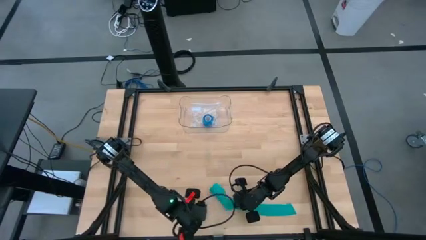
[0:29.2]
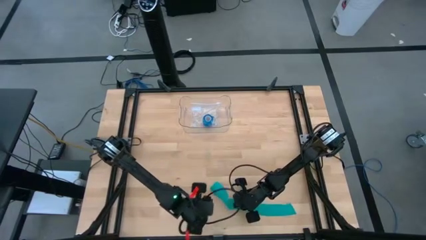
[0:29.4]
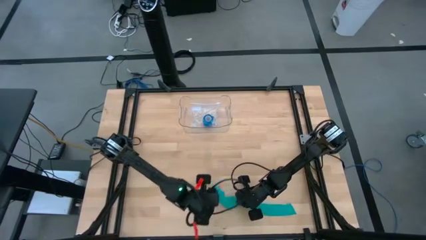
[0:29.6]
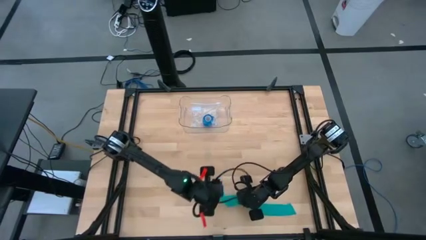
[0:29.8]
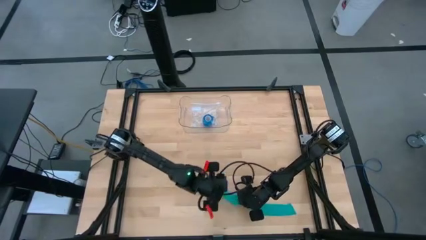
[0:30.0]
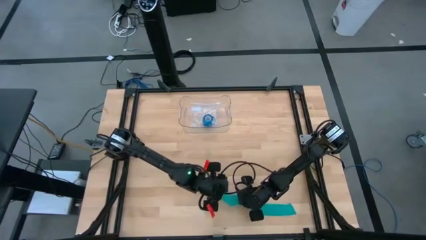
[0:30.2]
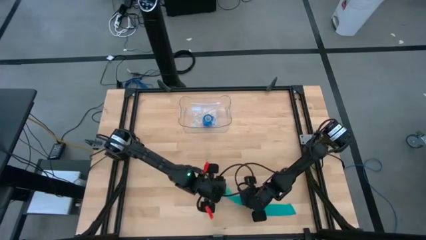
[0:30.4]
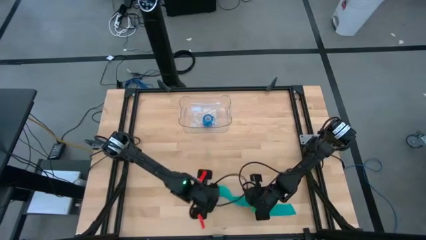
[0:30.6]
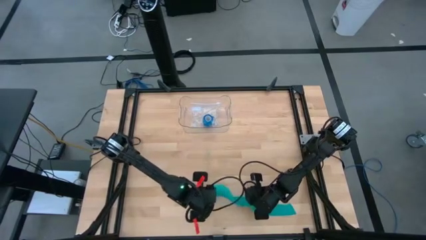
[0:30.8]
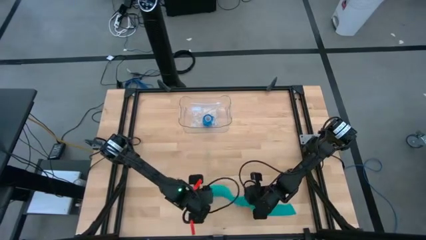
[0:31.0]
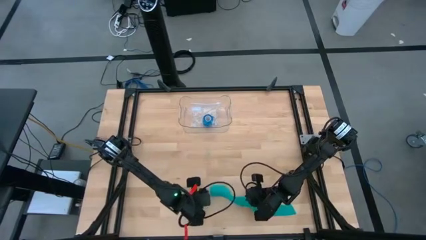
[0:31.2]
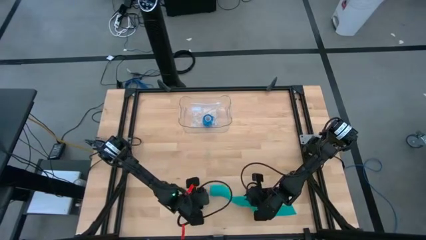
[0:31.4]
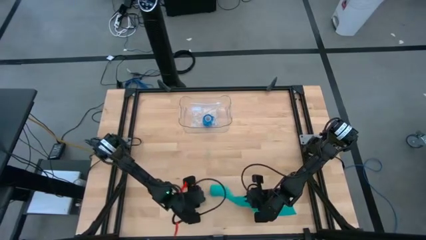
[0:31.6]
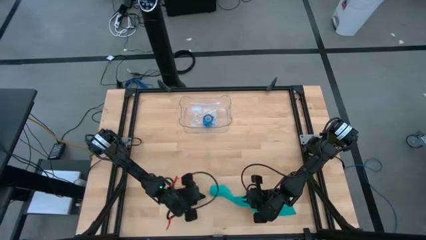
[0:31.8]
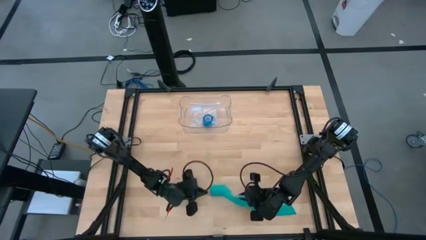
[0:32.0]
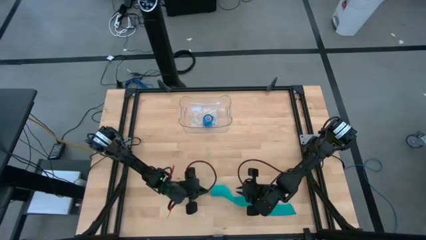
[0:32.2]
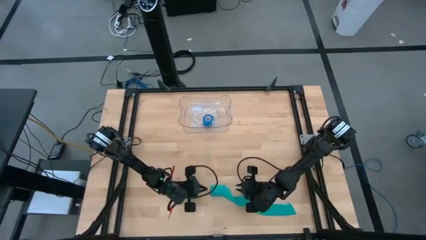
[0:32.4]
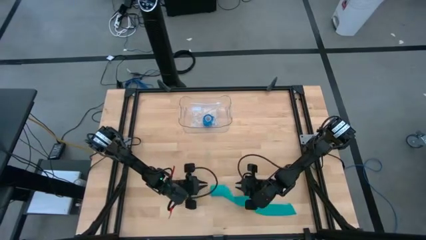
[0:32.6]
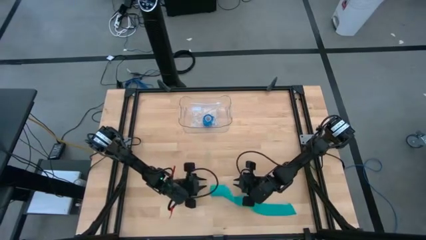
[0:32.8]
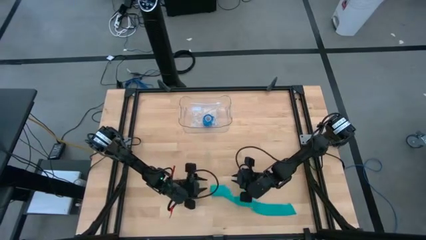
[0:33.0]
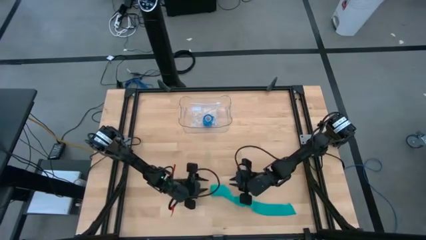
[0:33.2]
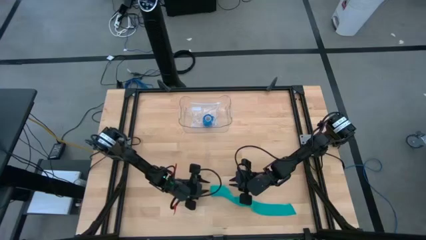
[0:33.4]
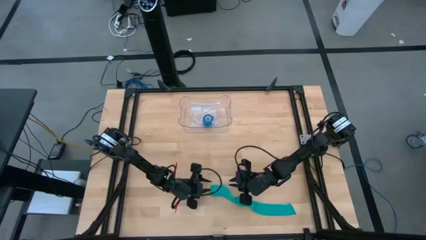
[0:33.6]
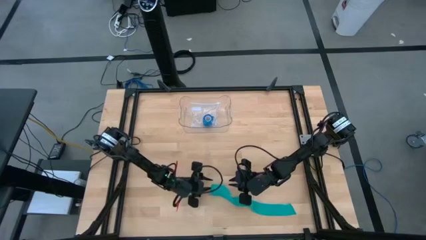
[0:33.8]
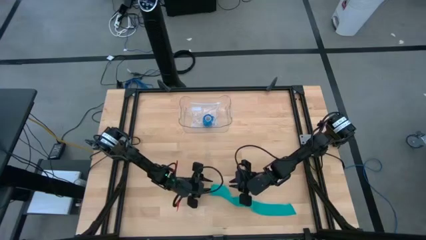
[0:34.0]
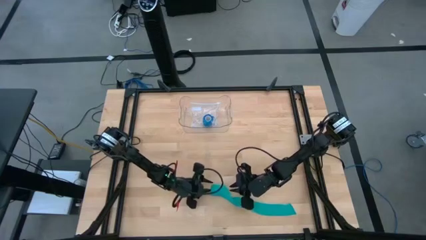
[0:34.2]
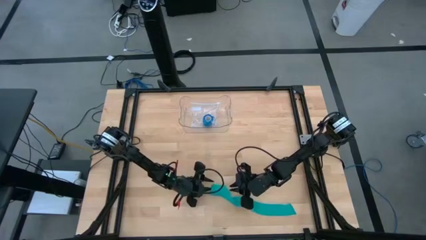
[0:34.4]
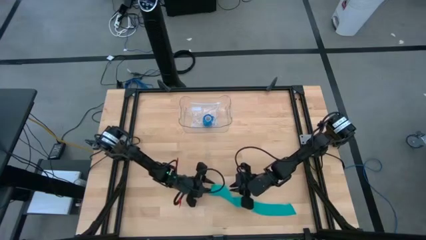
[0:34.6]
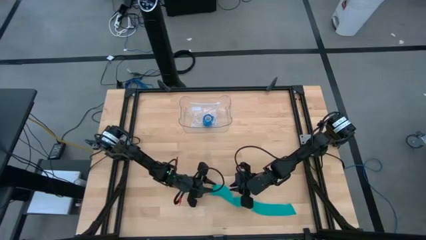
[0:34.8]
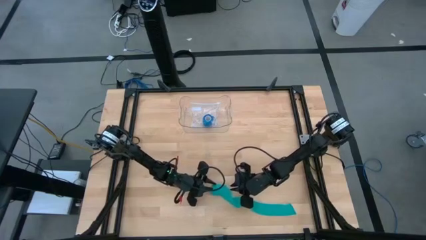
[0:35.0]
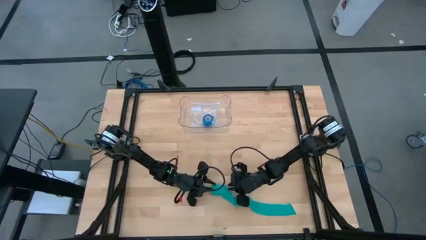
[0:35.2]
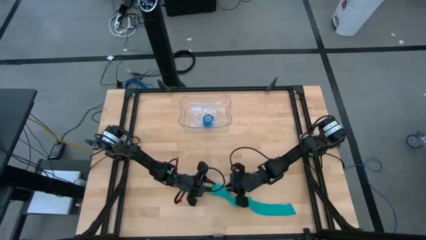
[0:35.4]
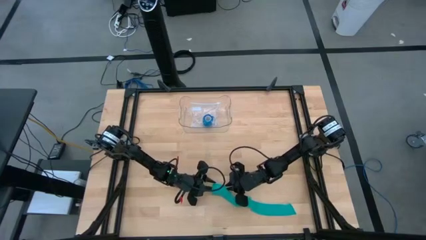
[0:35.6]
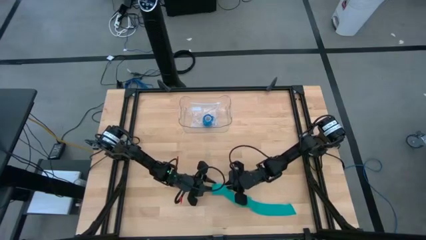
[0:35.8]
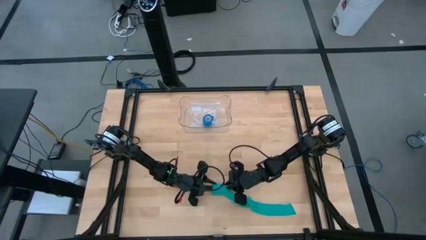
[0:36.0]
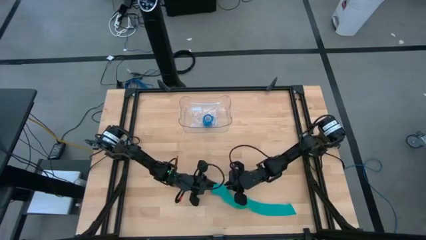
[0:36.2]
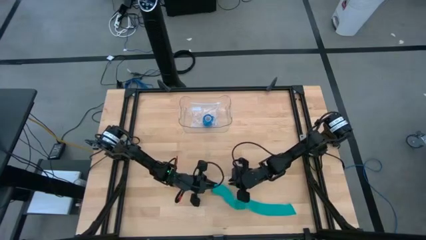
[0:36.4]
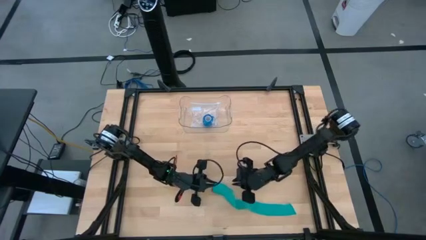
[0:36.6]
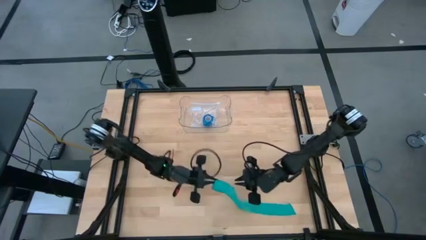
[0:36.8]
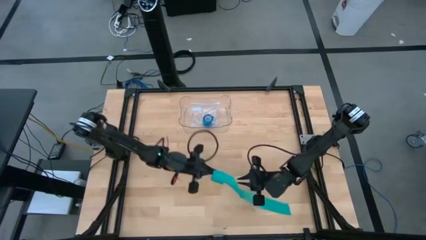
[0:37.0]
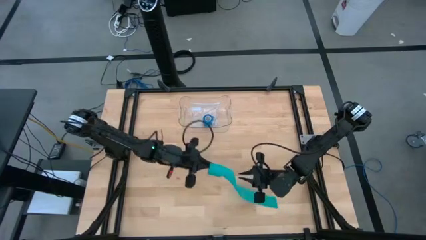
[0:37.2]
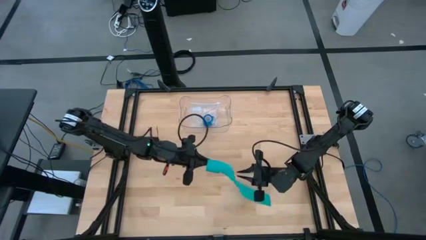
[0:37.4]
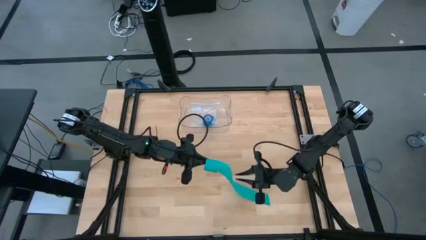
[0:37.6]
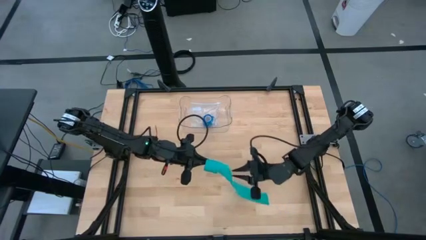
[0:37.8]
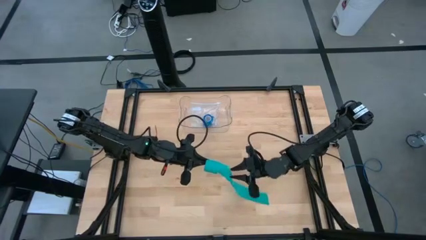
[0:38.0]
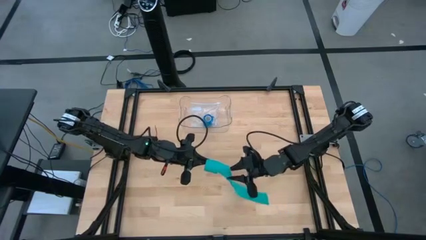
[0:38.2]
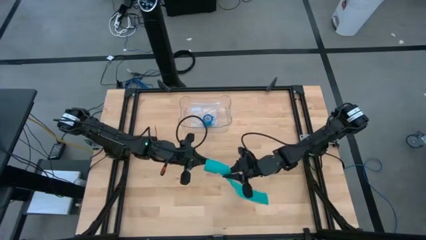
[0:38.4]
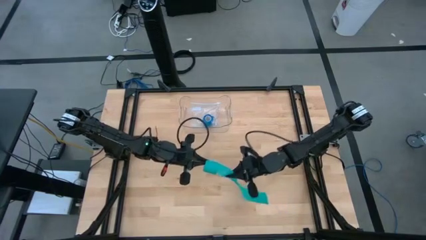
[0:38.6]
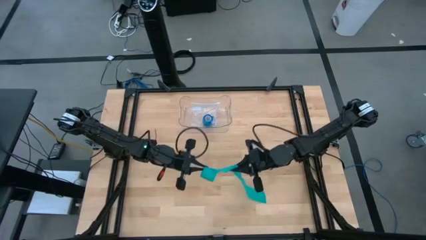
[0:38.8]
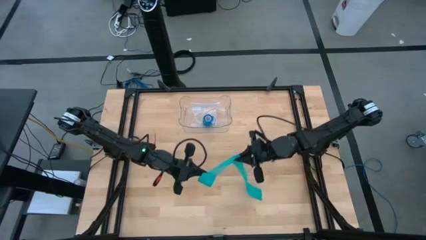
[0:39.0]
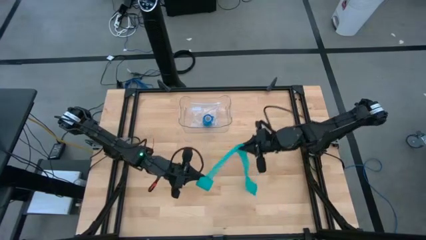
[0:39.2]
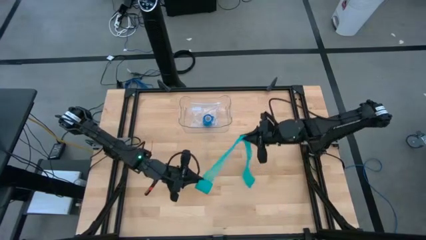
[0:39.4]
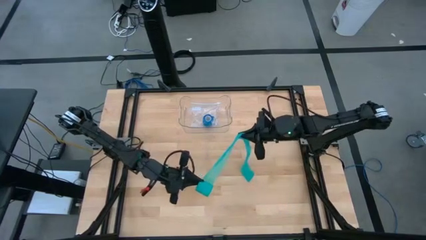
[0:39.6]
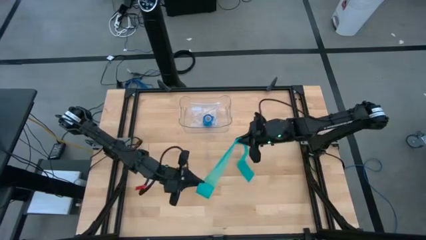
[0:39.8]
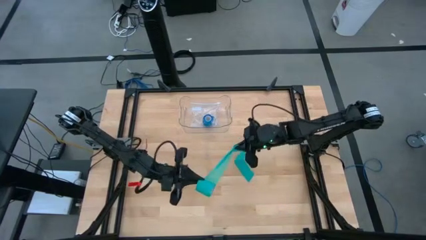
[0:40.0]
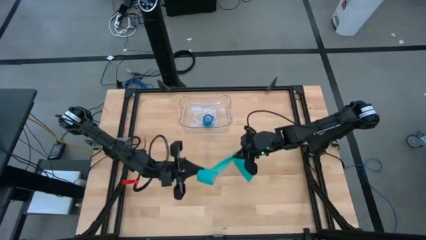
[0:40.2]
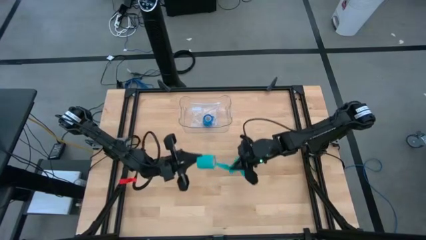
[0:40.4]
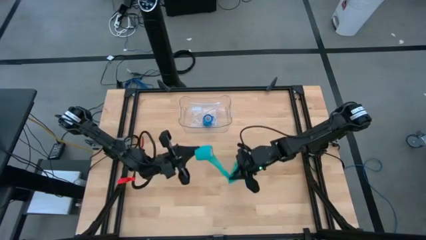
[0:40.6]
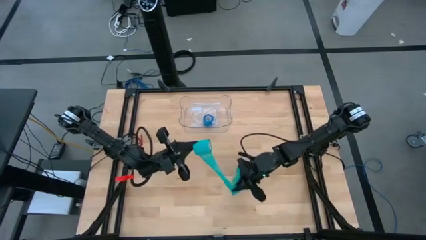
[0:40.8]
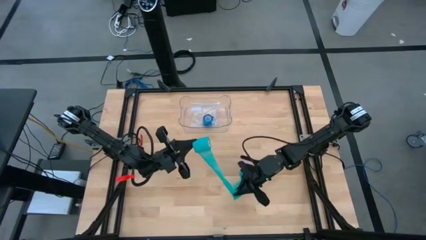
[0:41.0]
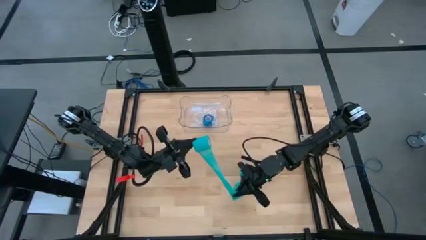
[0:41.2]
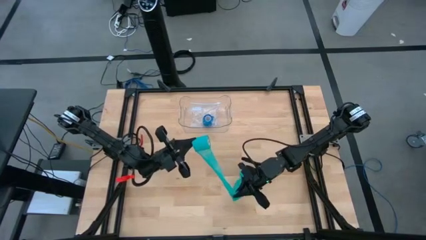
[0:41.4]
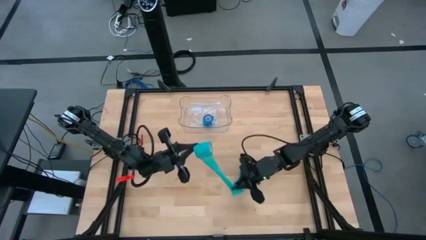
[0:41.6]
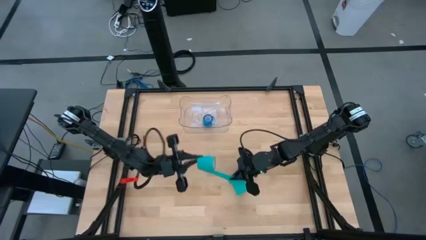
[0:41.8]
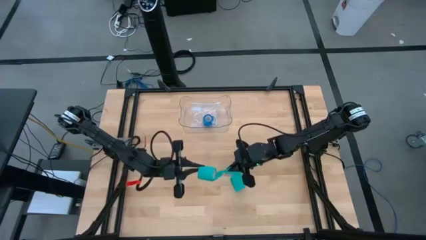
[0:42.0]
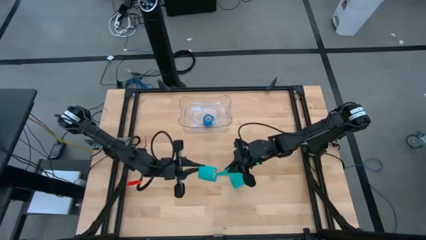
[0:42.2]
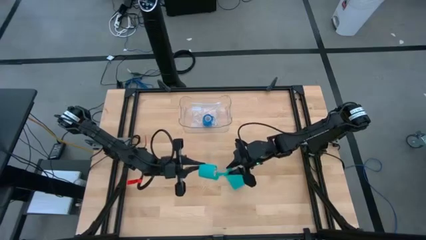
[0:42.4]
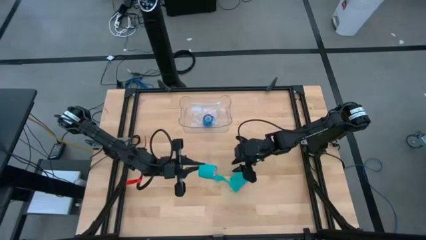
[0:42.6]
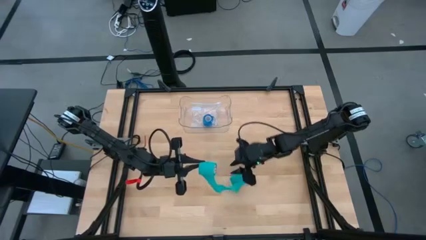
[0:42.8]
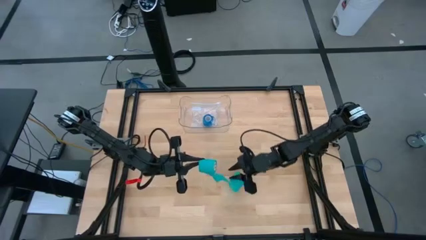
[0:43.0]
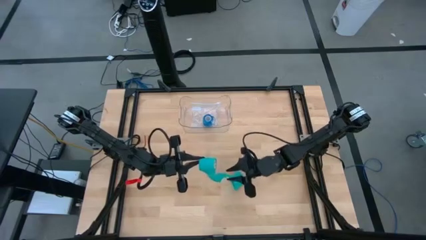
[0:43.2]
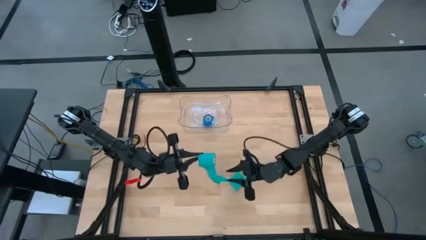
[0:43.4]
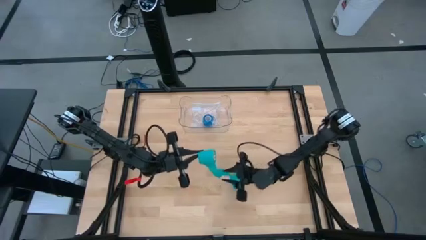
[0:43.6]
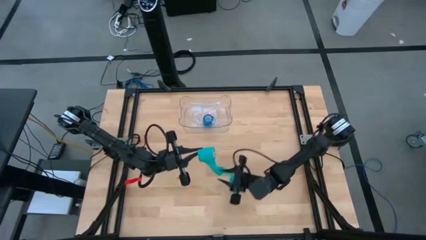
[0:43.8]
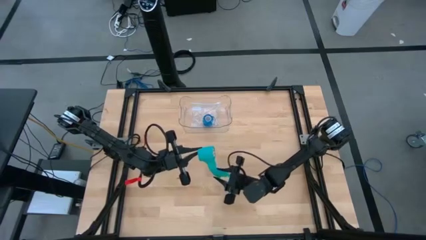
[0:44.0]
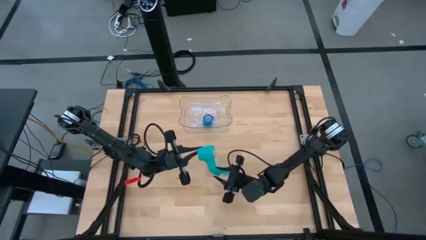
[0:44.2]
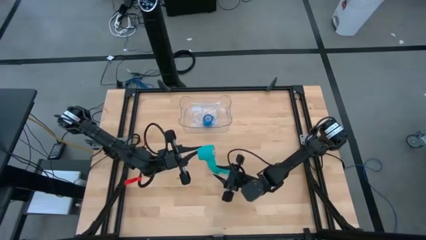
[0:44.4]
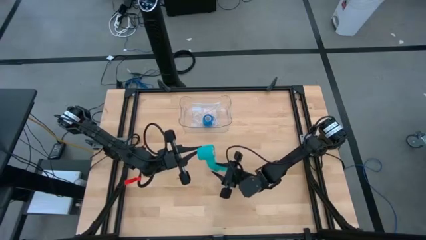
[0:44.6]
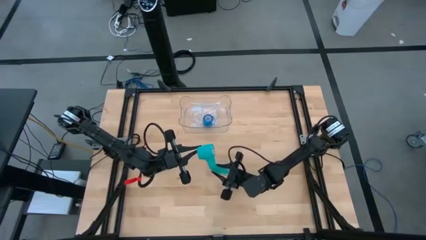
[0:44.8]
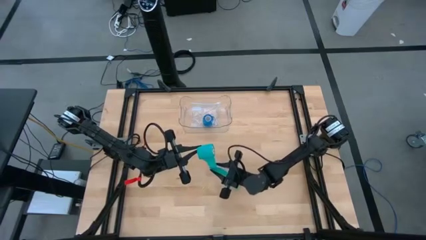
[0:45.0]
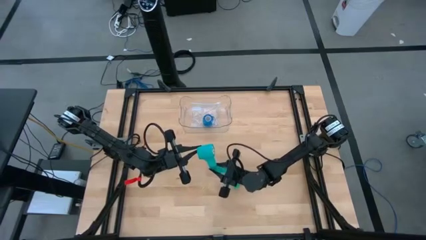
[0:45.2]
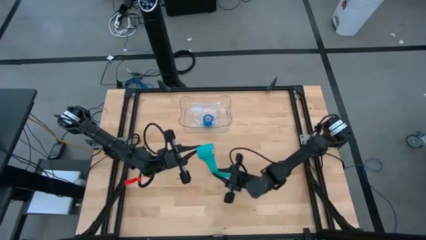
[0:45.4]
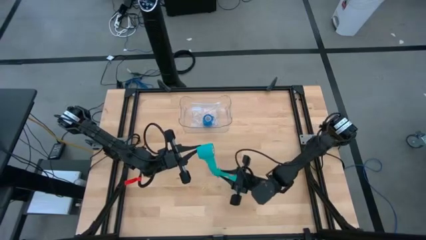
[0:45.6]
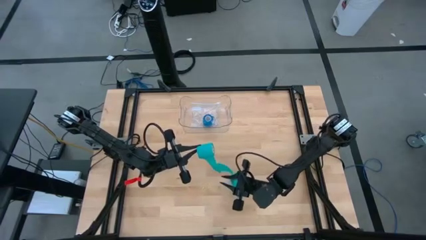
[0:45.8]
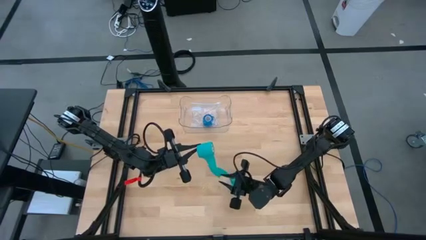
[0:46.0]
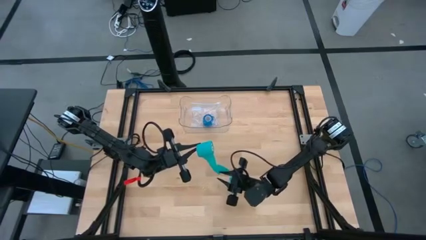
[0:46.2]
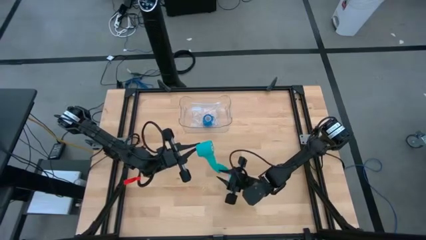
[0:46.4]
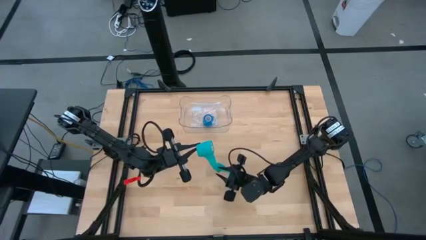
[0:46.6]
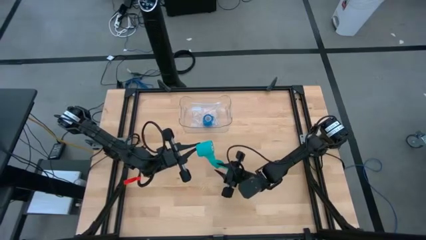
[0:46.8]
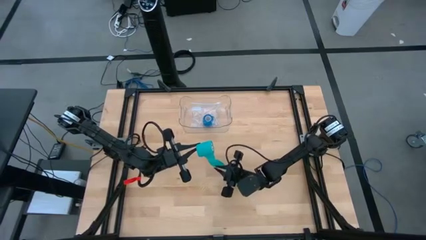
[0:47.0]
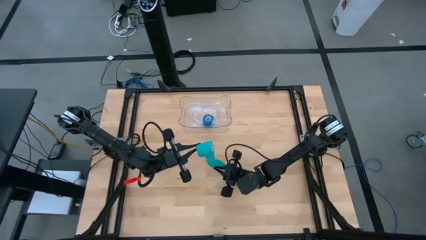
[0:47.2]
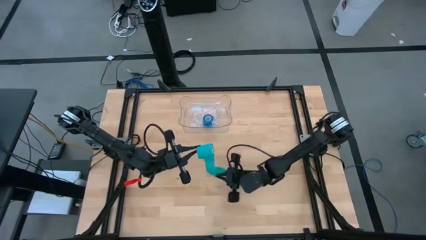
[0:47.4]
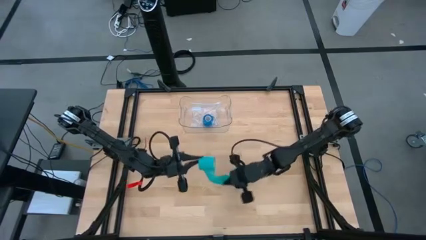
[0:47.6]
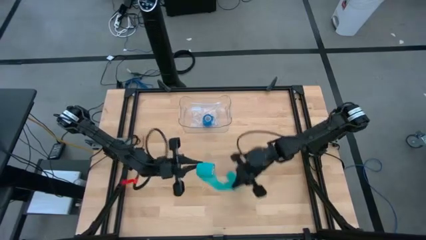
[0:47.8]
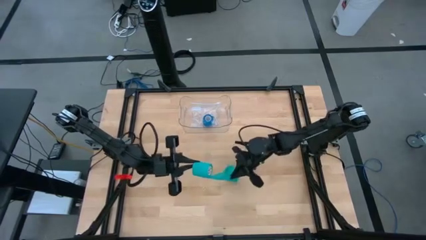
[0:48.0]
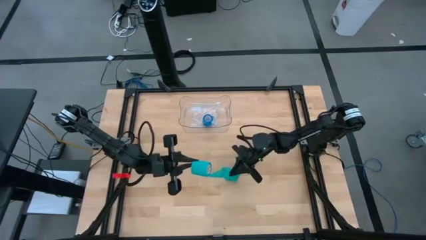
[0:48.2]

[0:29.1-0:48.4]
Task: Roll bandage
Roll the green bandage
